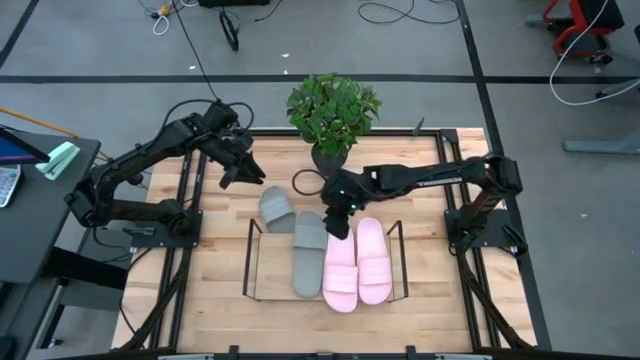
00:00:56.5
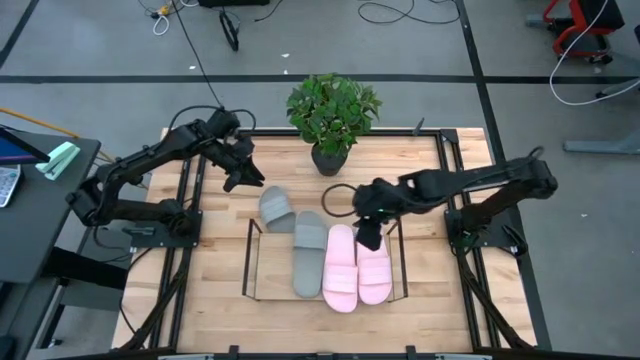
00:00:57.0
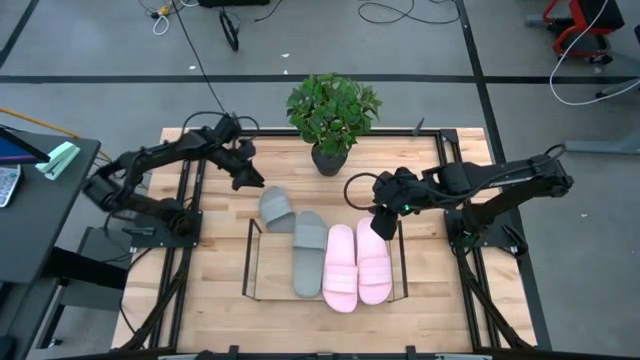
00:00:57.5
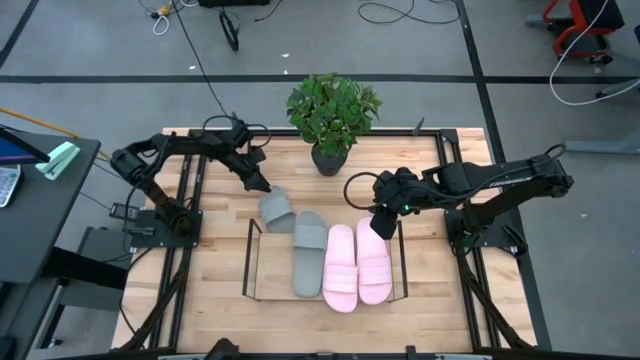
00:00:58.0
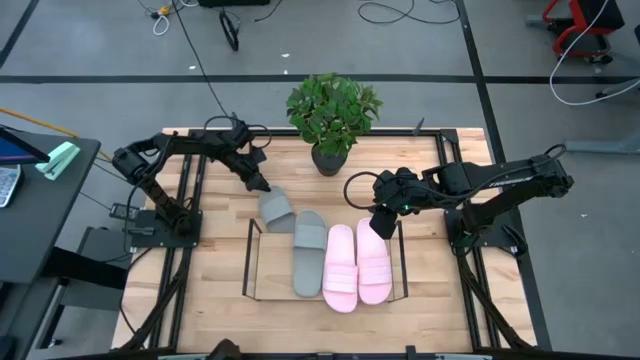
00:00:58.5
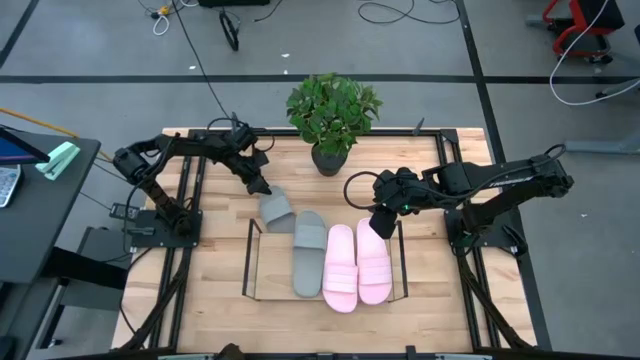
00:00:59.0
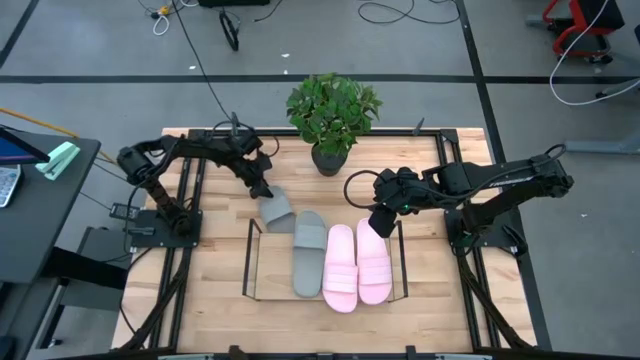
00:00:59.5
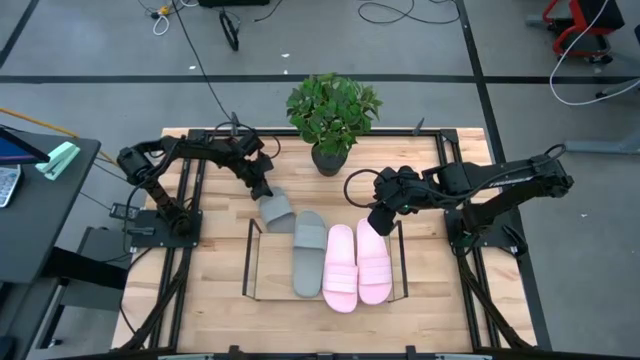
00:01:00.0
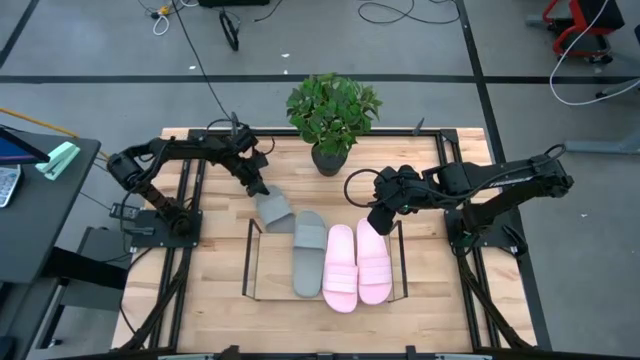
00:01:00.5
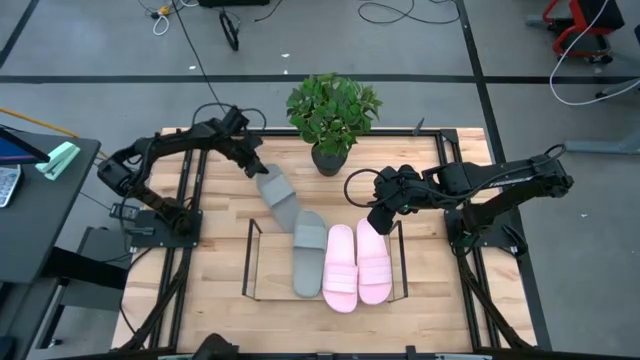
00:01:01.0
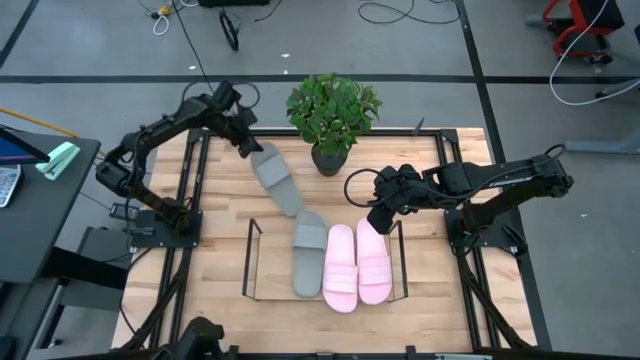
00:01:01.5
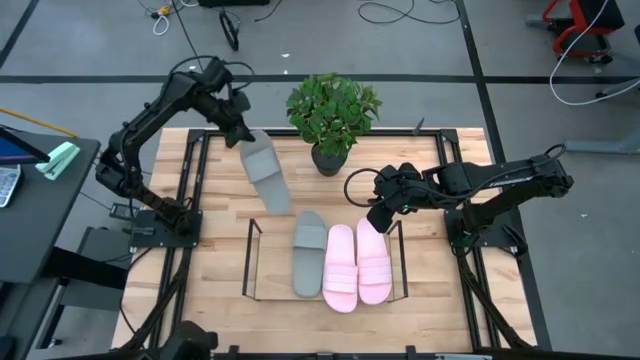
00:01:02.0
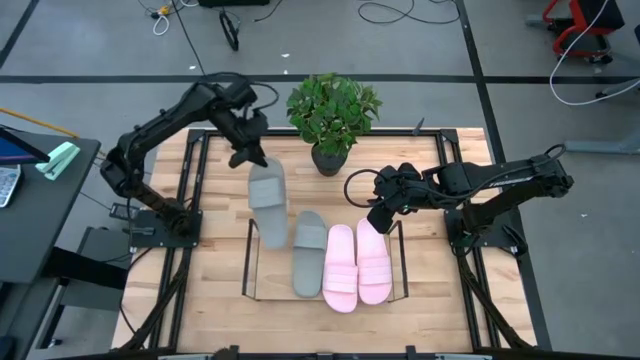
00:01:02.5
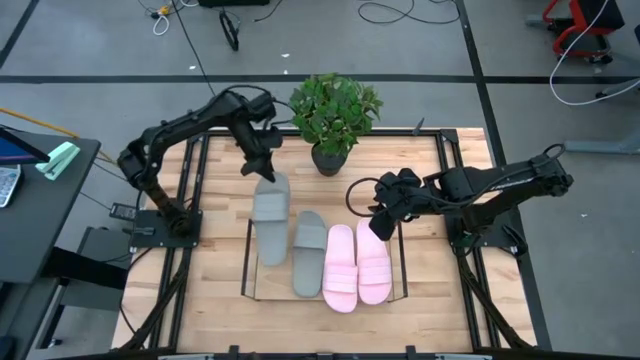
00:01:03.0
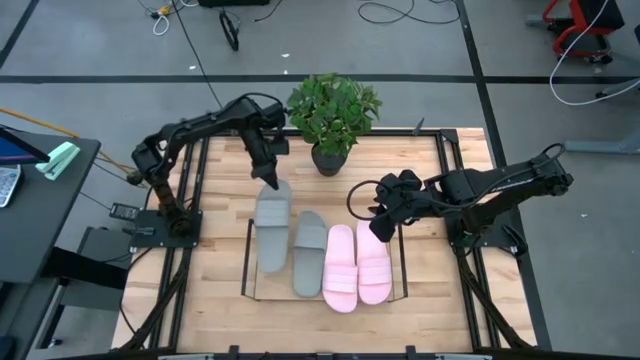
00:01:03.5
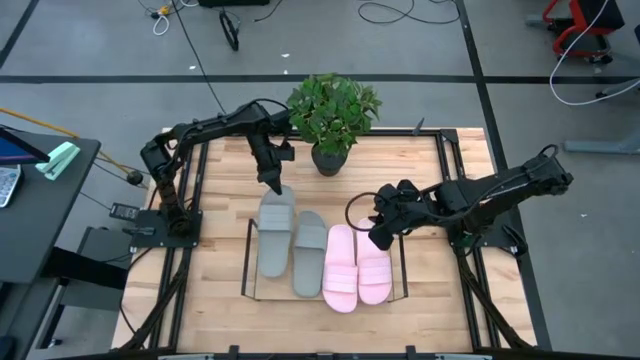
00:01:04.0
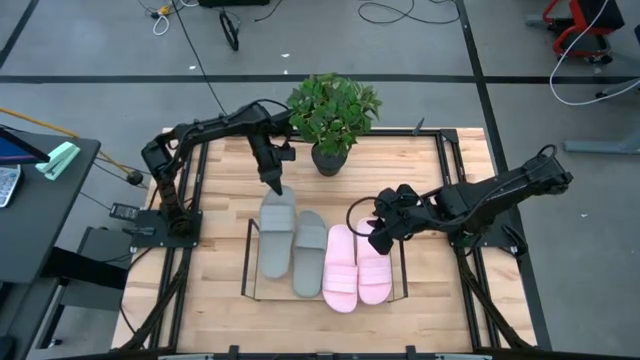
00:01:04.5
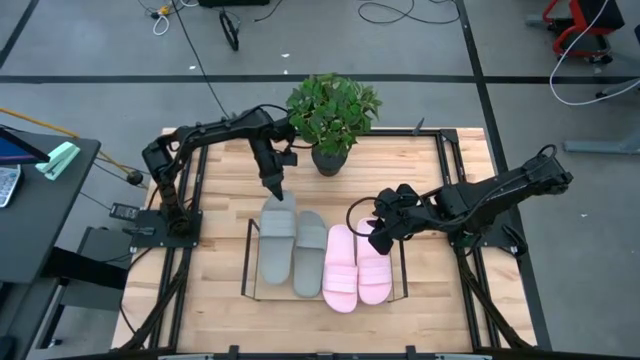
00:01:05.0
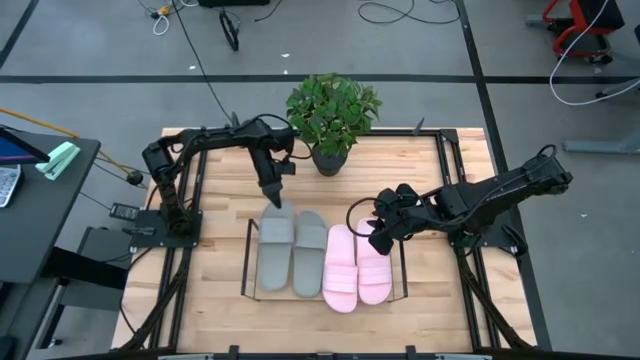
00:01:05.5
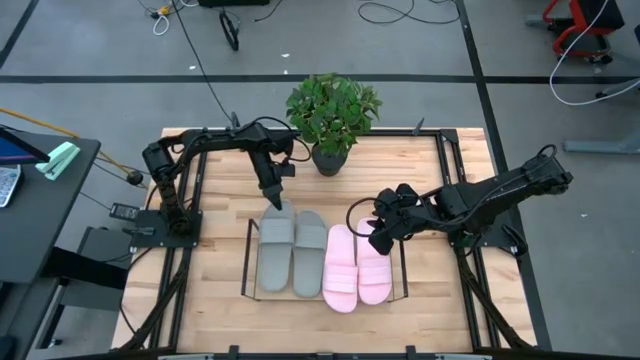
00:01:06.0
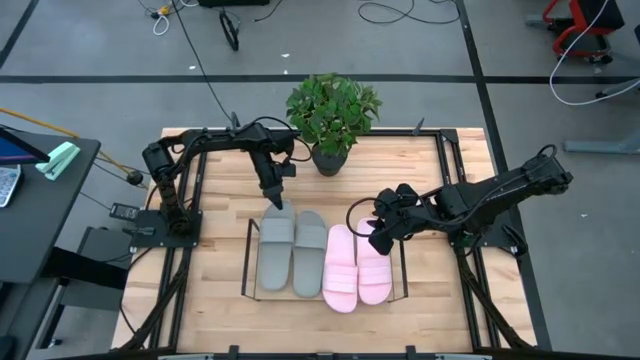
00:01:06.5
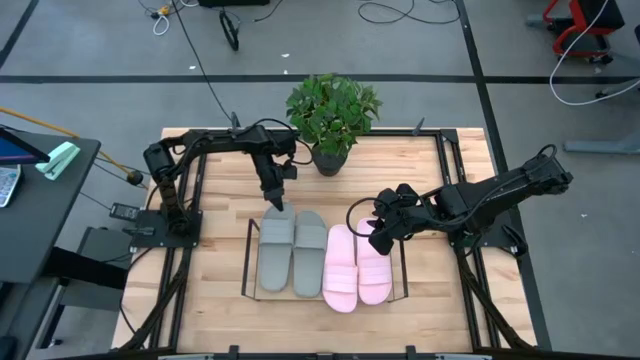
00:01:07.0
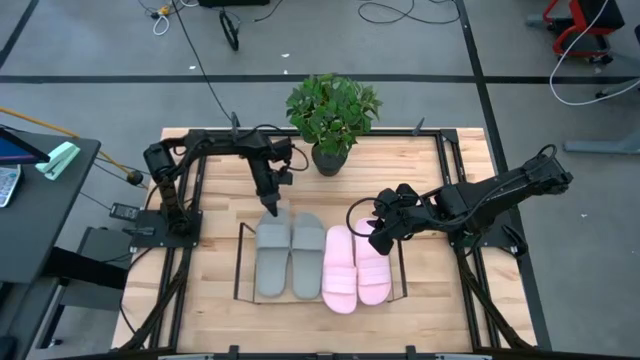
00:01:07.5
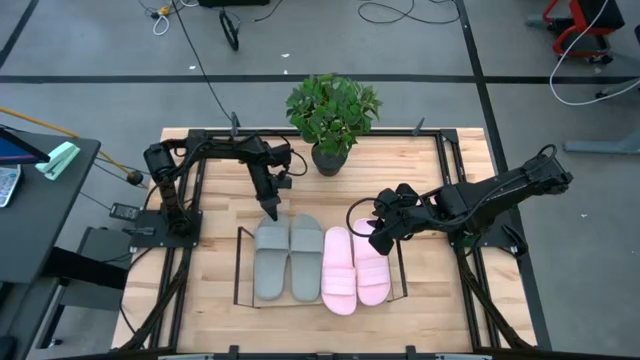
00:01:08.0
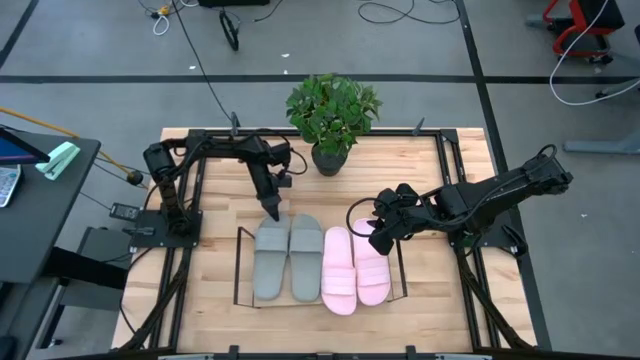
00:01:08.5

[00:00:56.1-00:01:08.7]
Task: Pick and place slides into the shelf
Put the gray slipper on the shelf

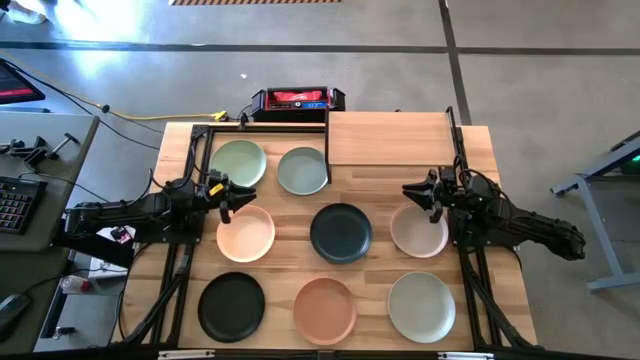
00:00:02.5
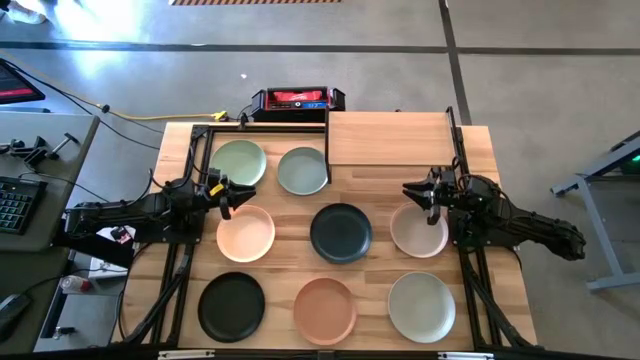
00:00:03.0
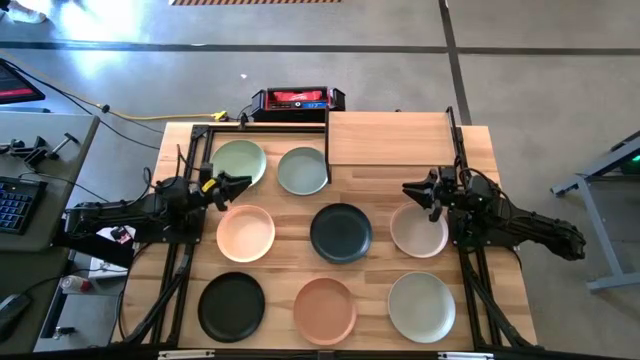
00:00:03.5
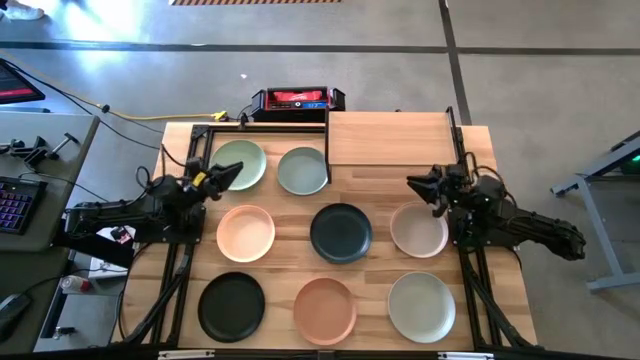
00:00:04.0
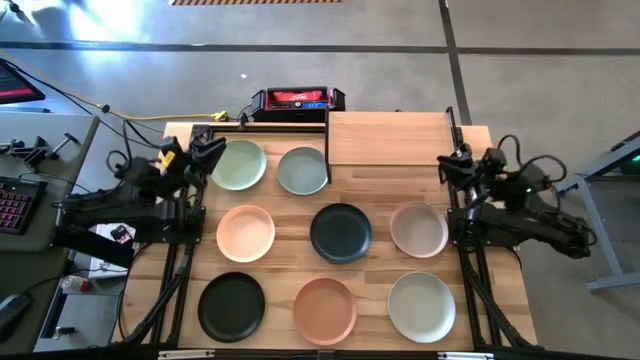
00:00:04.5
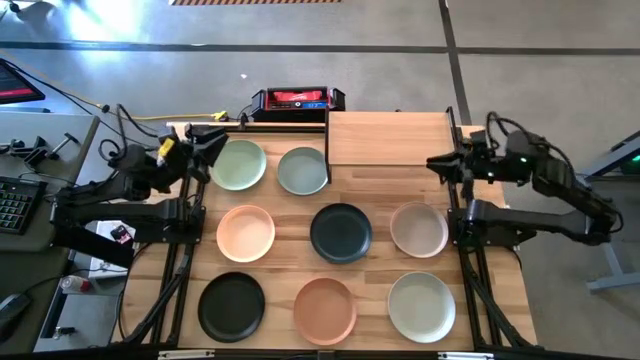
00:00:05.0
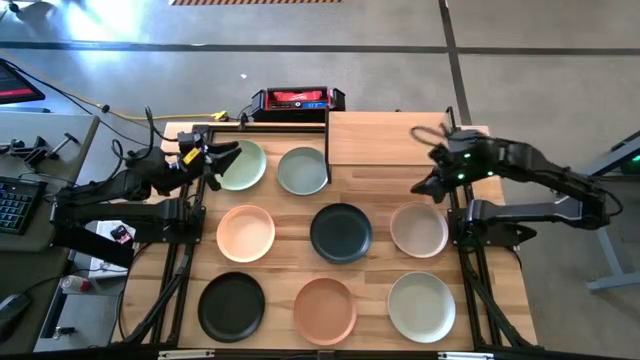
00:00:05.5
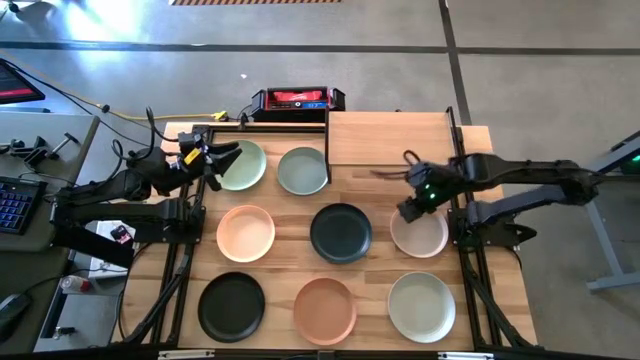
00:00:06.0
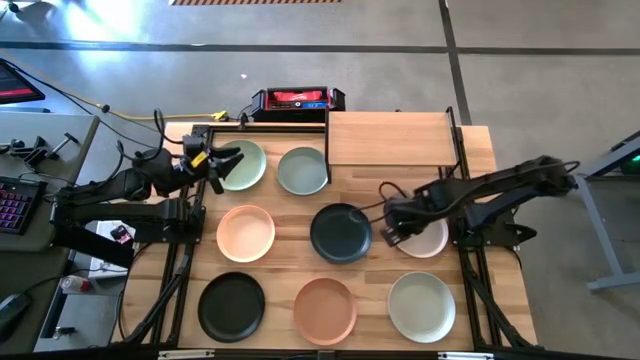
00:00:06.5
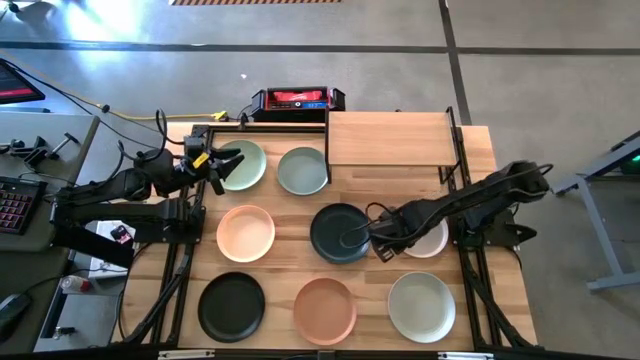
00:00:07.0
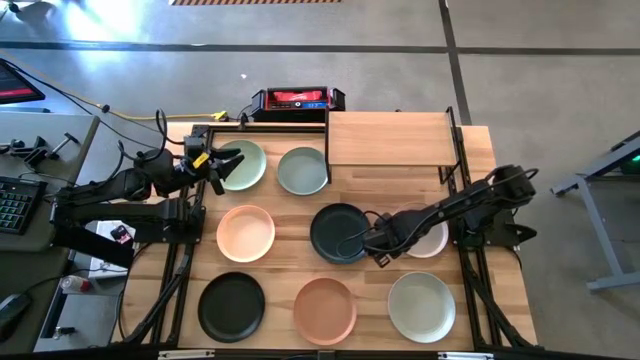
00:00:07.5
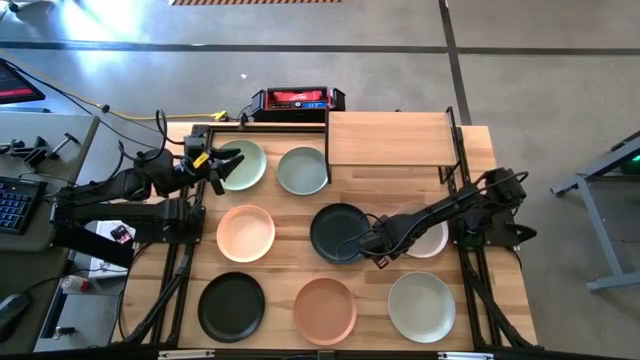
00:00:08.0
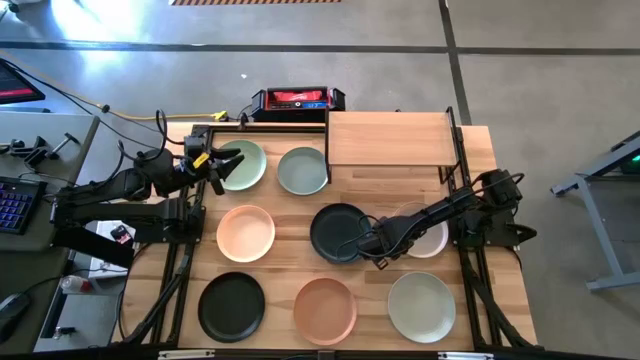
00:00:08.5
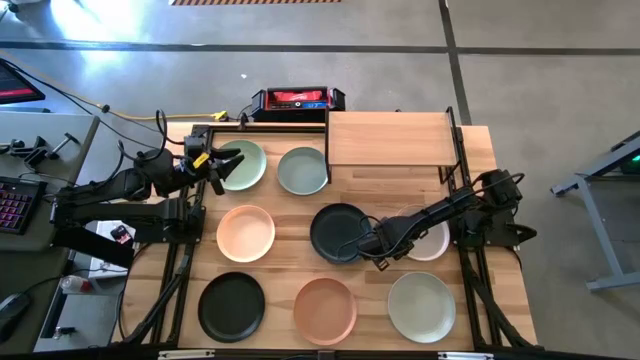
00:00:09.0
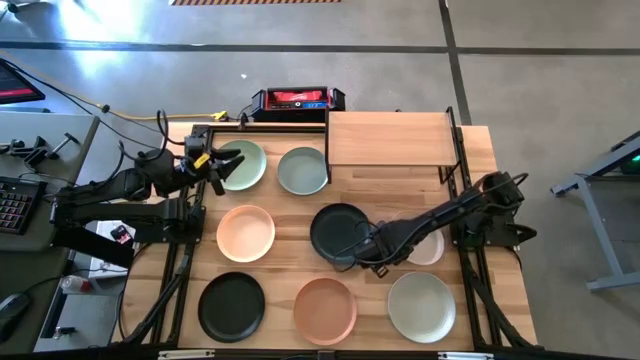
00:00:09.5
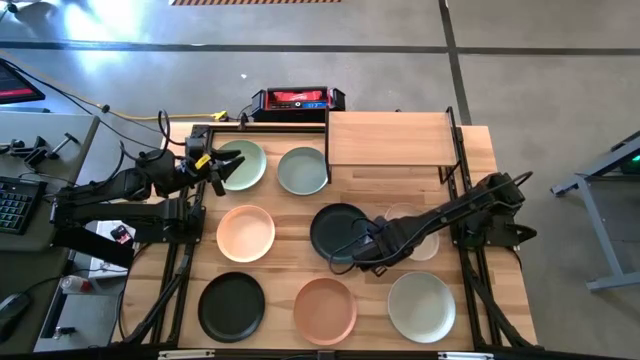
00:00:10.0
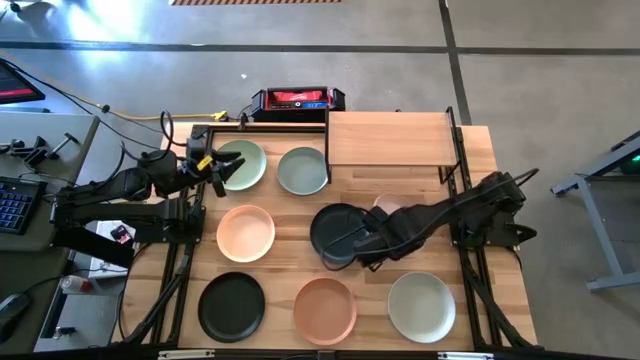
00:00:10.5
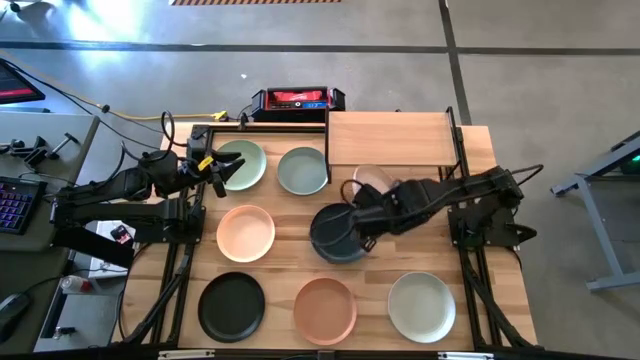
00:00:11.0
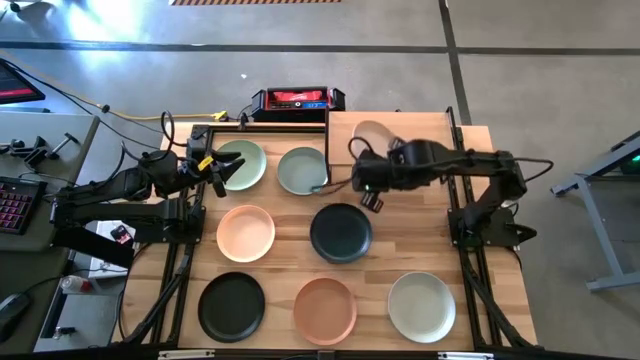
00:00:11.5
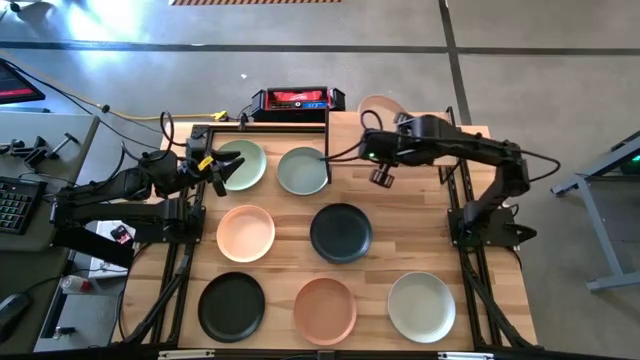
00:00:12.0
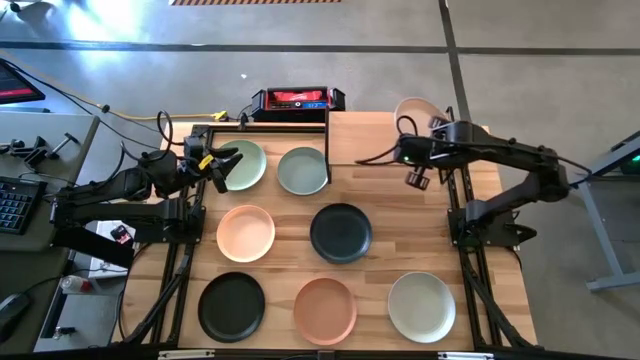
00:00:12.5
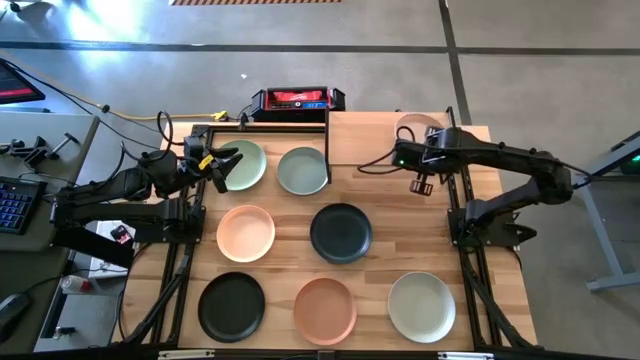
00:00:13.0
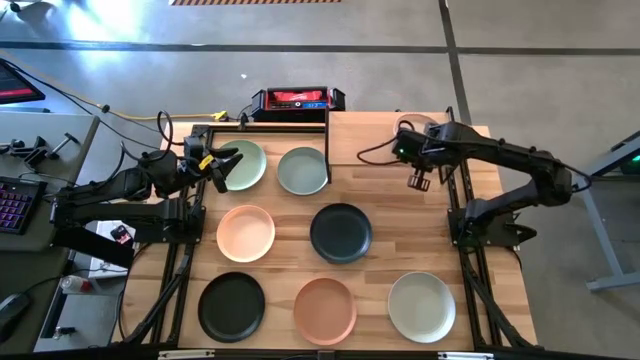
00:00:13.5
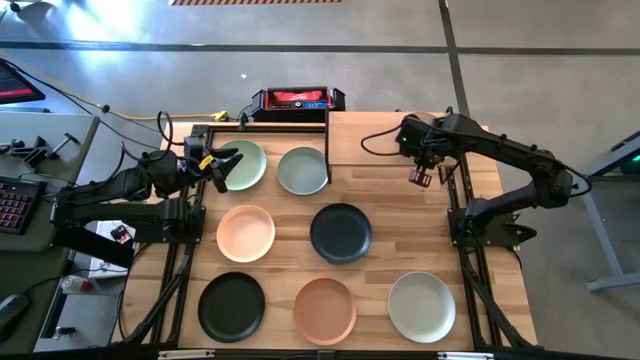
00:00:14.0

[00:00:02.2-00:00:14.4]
Task: Place and stack plates onto a shelf
Put the light brown plate on the shelf
